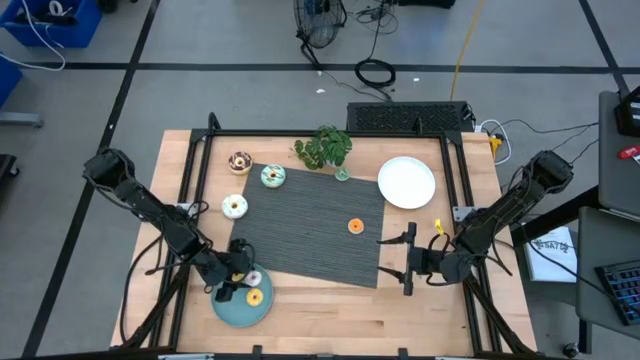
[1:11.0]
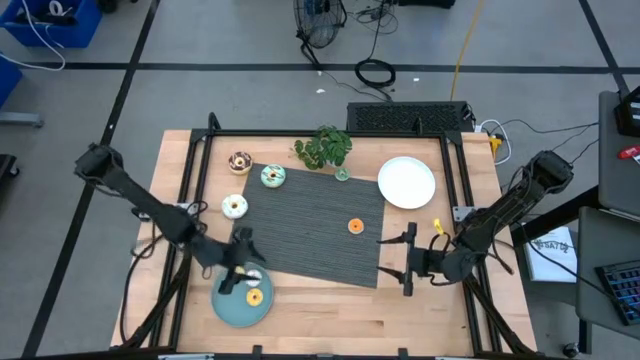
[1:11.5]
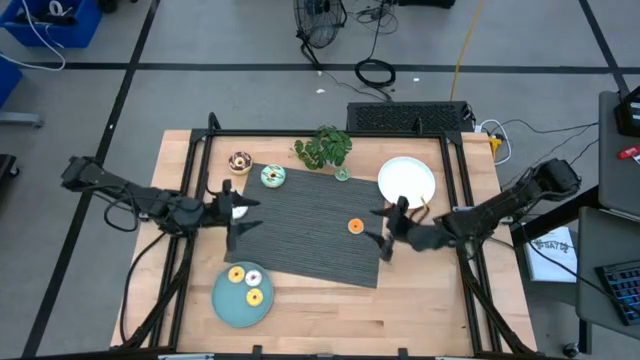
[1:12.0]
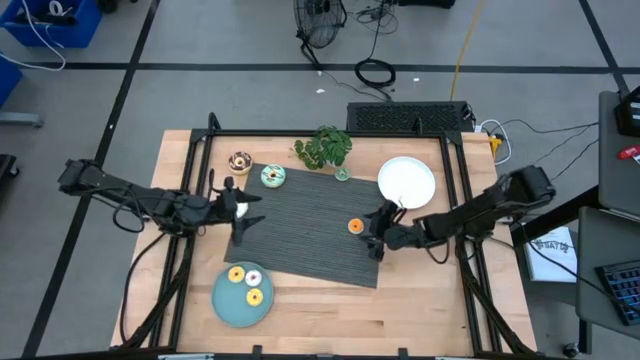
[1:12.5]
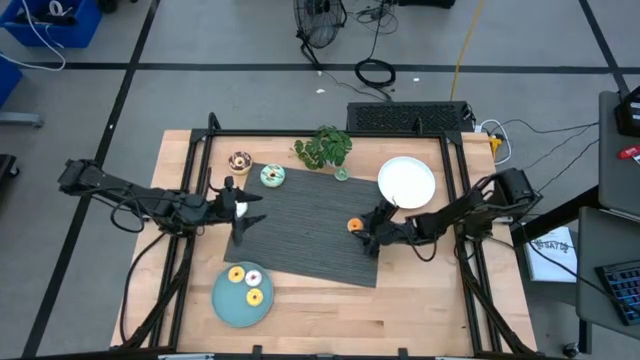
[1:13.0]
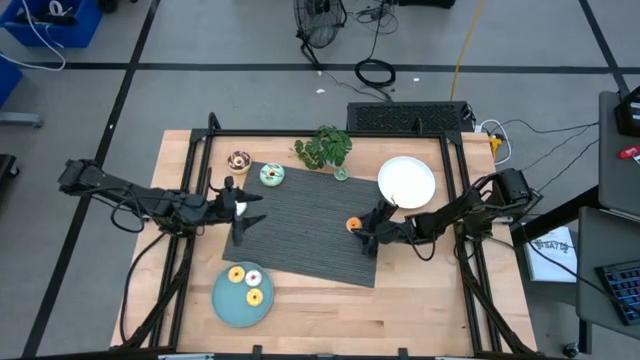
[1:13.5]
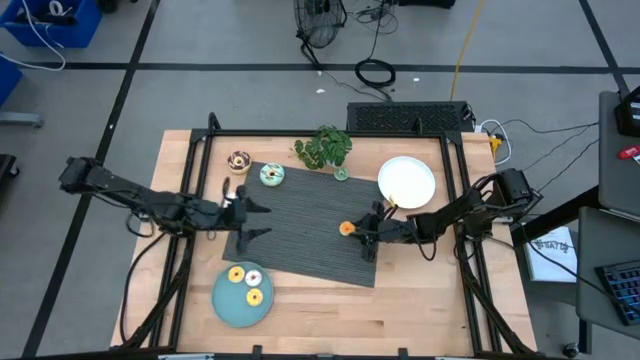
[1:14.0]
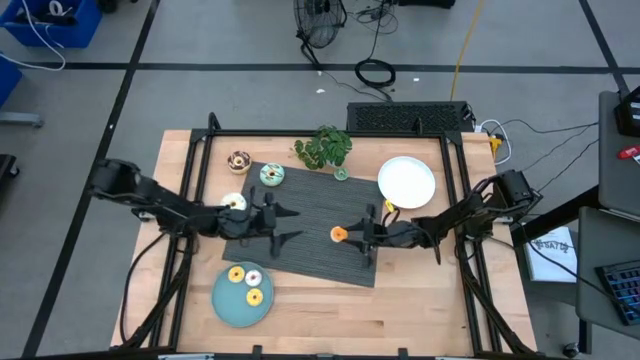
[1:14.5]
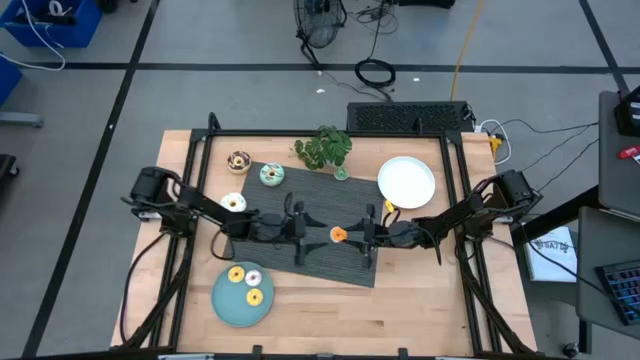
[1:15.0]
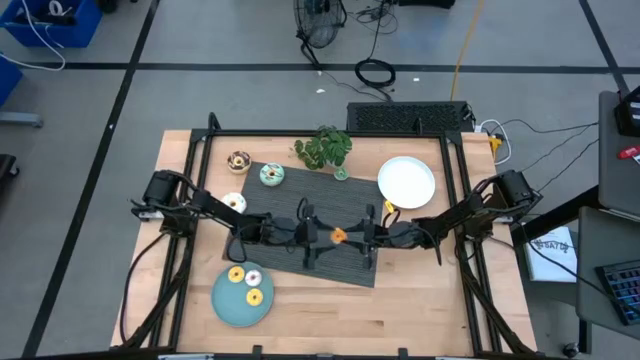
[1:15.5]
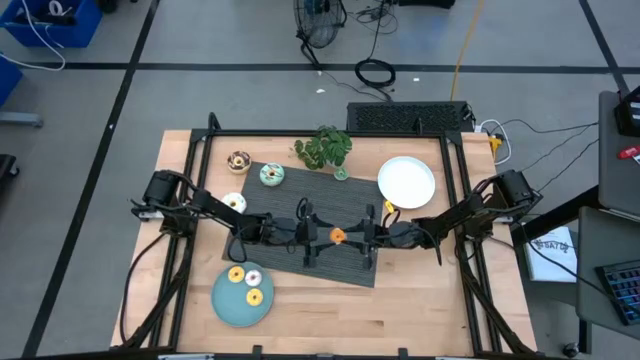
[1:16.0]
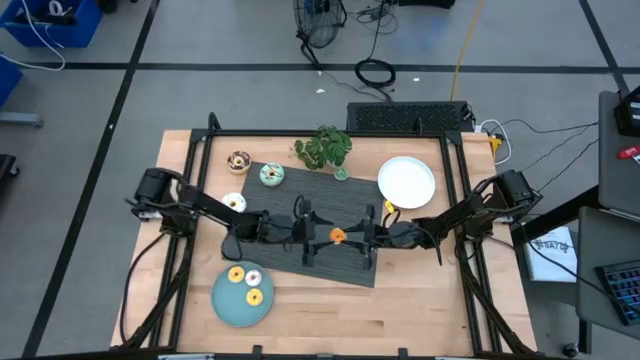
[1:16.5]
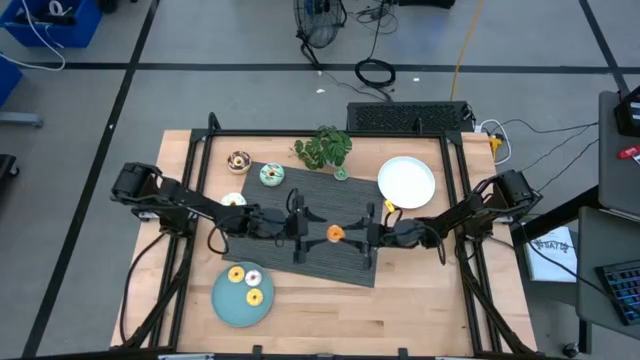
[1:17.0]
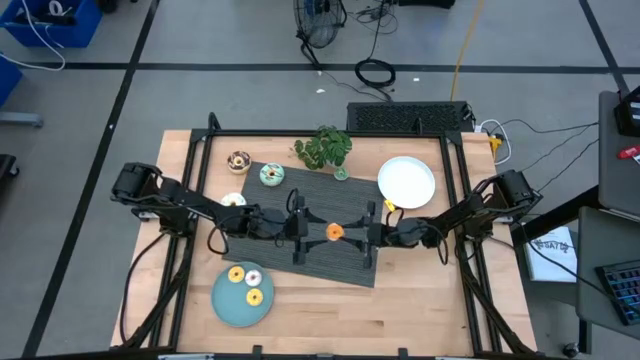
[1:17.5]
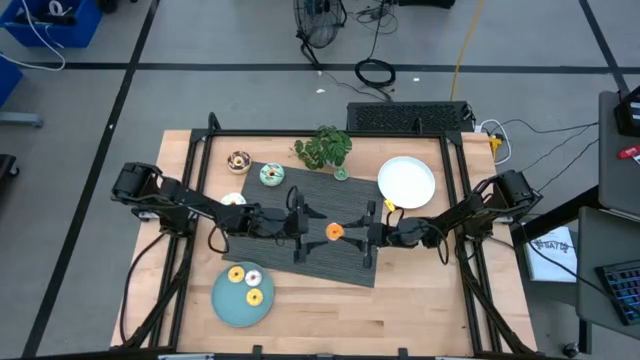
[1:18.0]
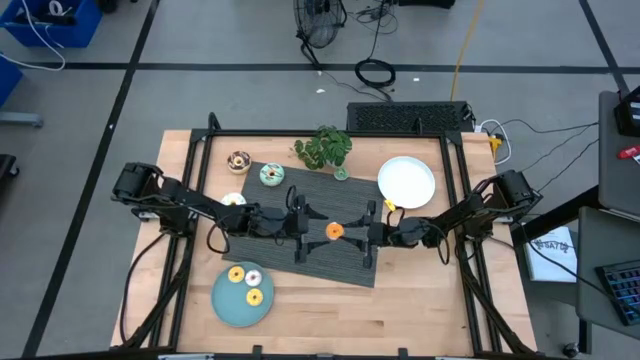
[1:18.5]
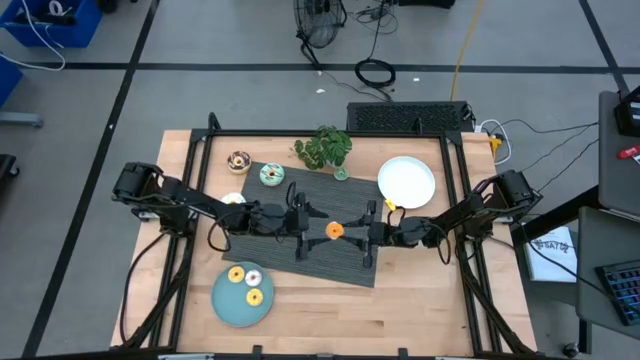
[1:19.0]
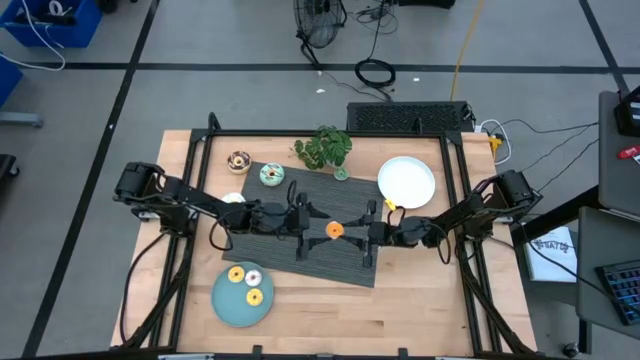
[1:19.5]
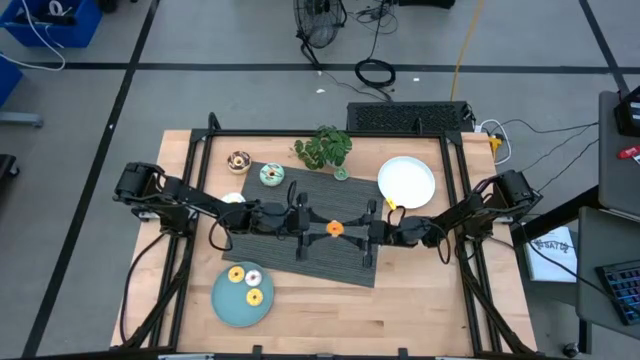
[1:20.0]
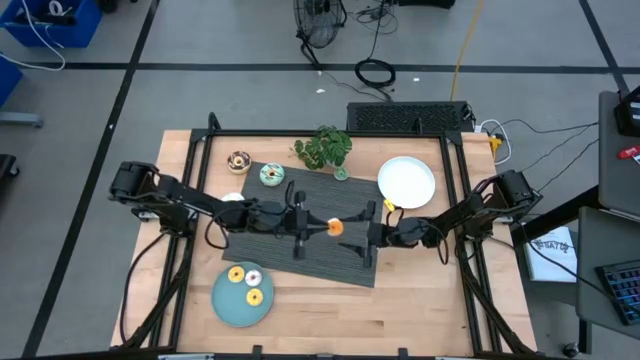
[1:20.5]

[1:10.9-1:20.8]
Task: Pick & Place donuts
Put the small orange donut on the blue plate

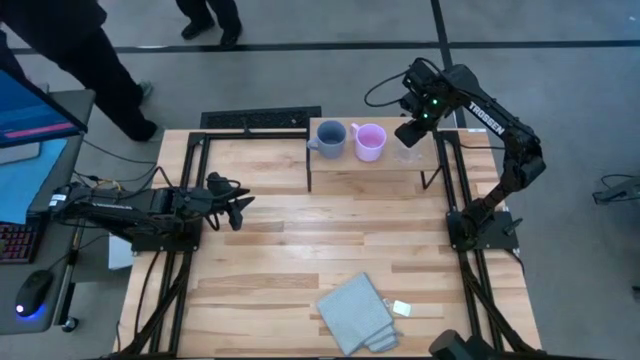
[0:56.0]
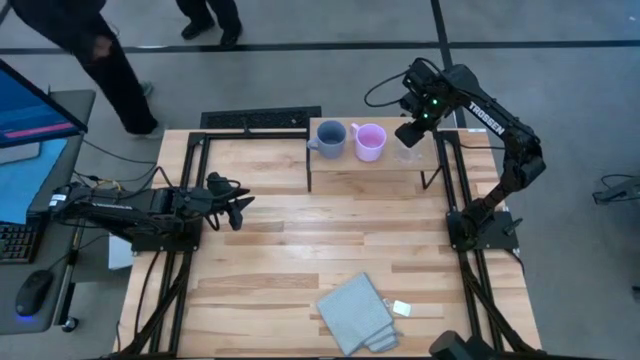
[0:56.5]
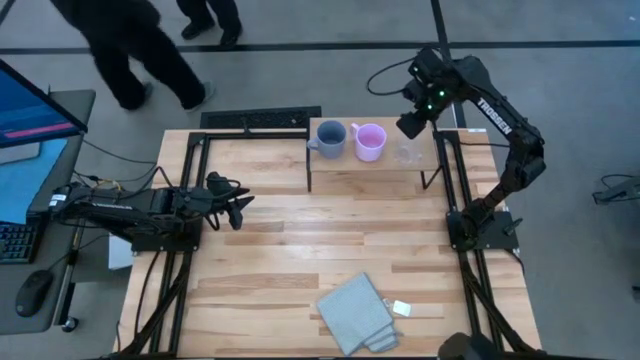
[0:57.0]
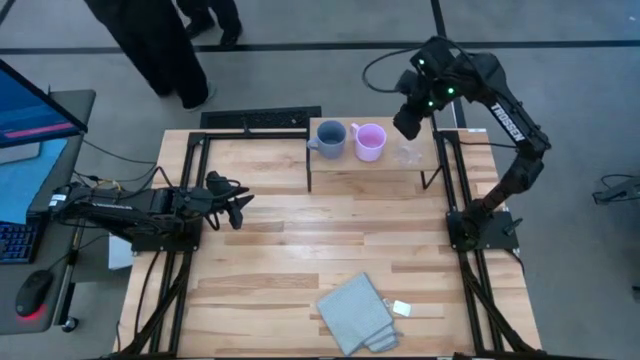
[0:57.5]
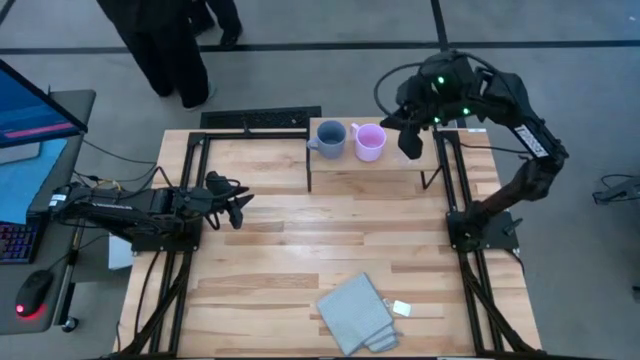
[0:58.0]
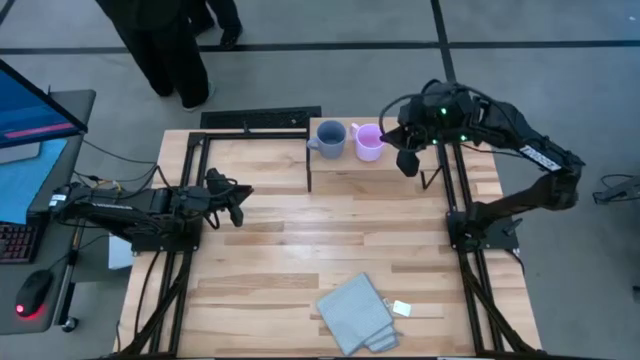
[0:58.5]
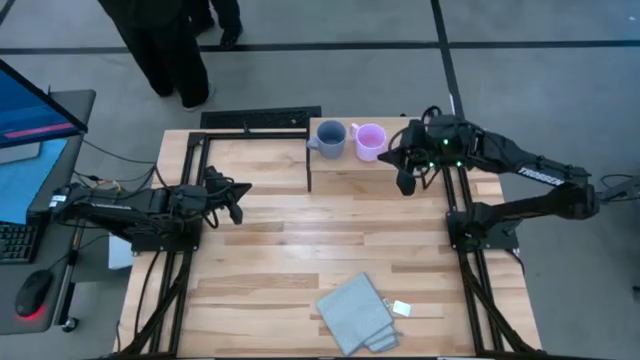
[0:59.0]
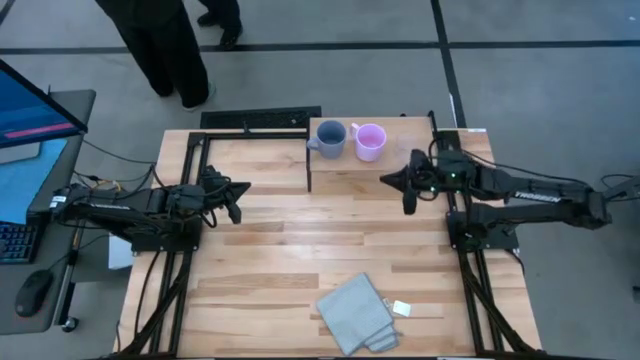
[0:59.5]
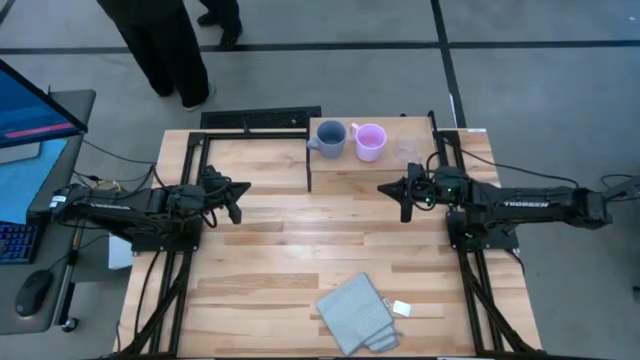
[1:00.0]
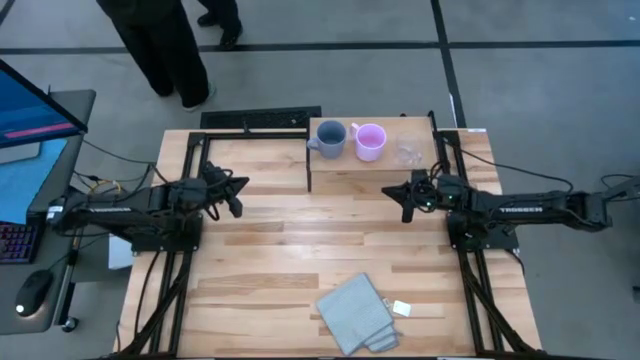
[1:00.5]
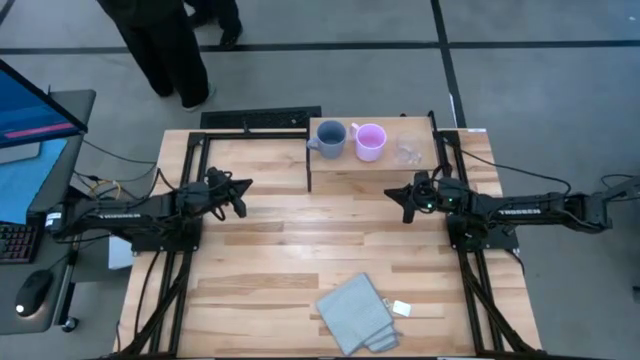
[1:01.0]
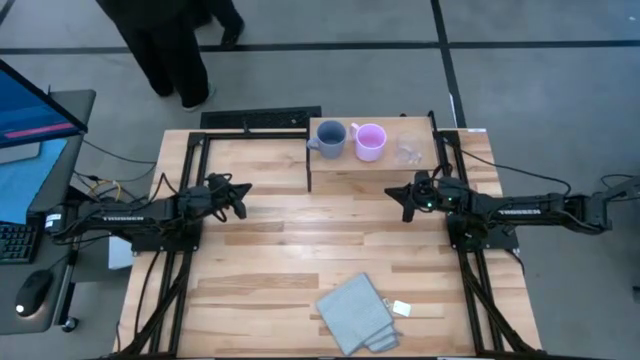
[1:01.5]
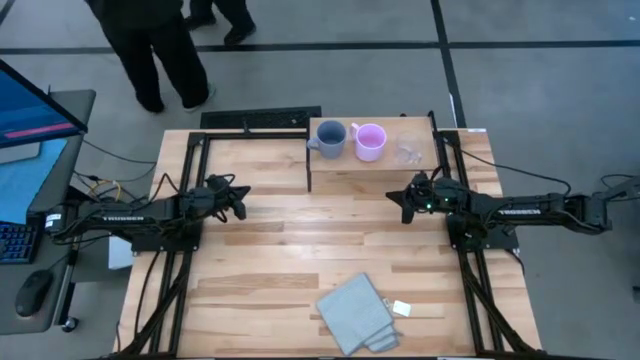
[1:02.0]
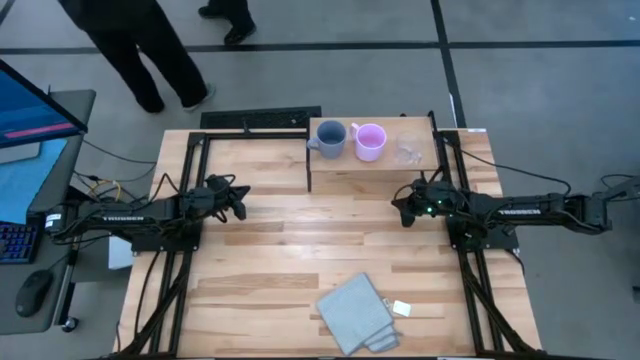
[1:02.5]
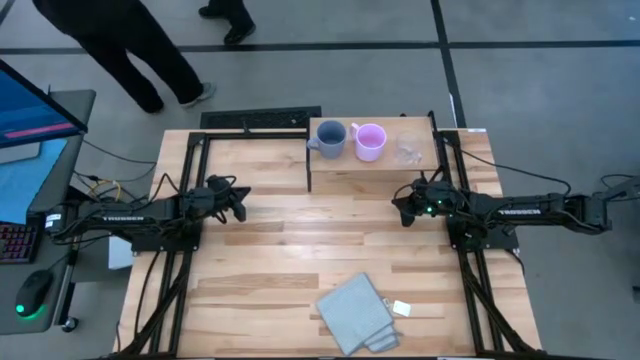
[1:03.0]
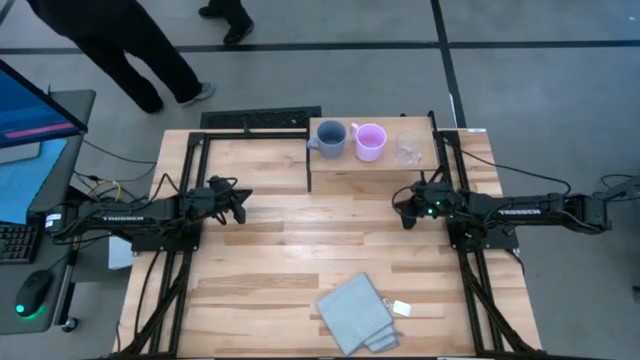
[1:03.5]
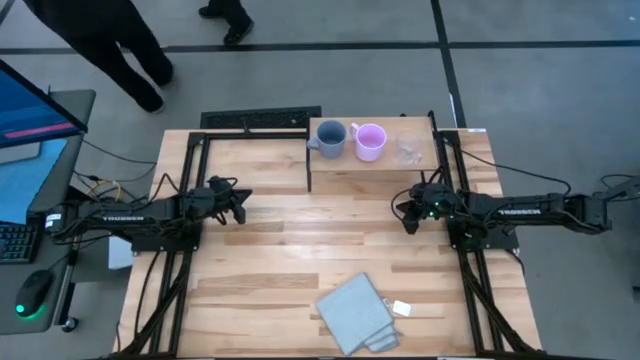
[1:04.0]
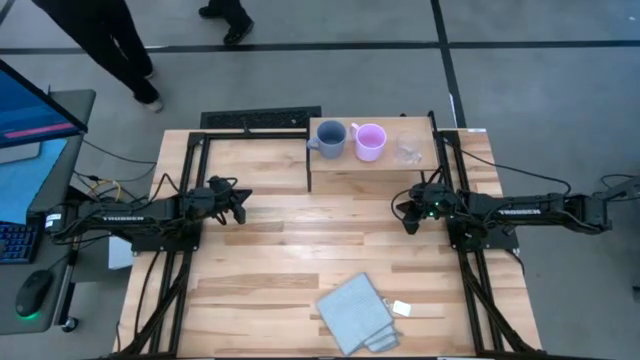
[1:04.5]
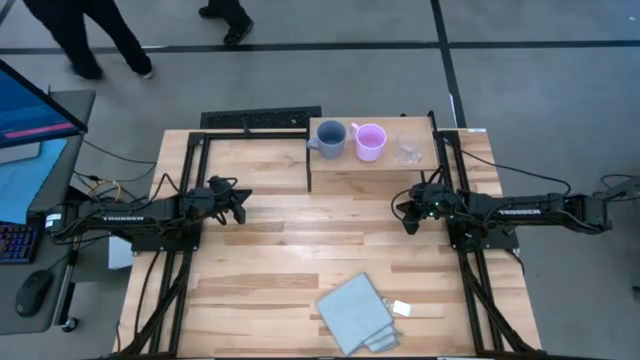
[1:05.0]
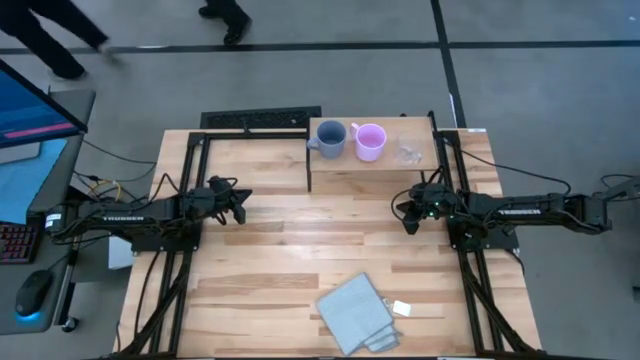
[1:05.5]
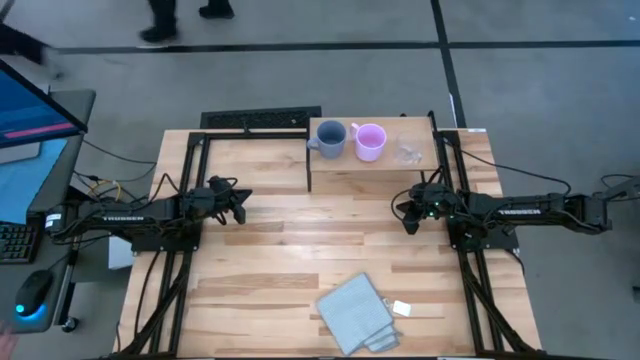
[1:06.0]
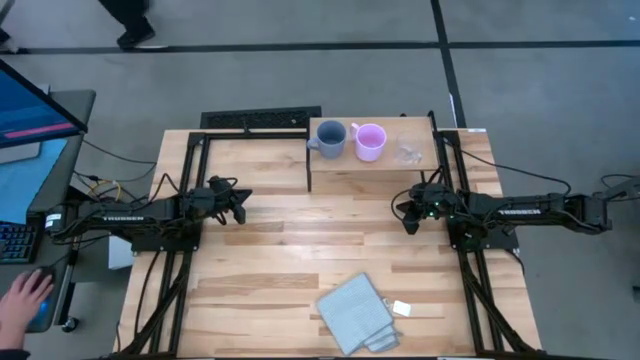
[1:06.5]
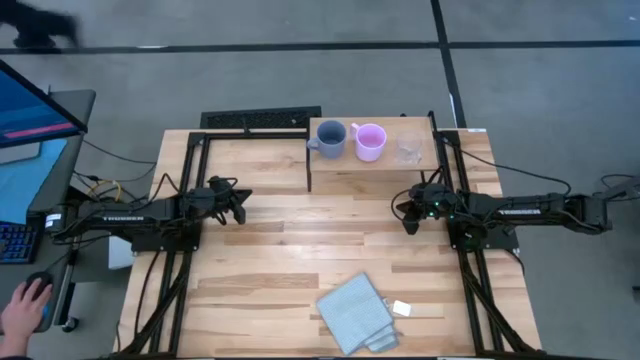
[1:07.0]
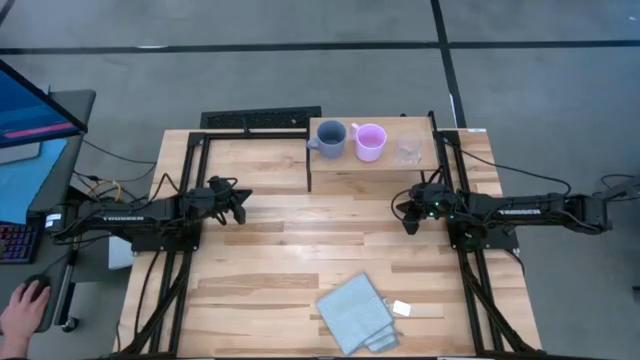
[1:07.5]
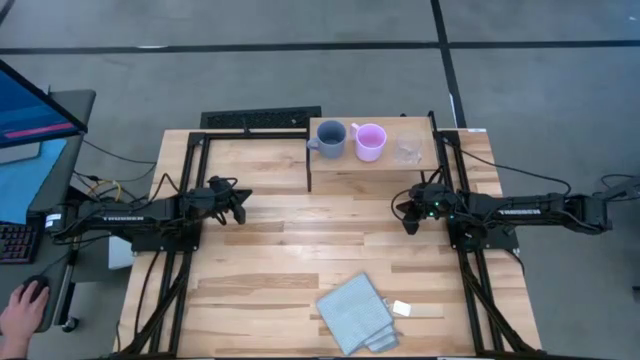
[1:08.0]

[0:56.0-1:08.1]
Task: Stack small to large cups/mugs on shelf
Return to Home Position
